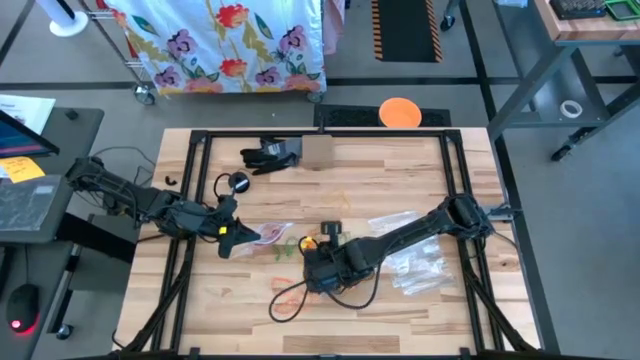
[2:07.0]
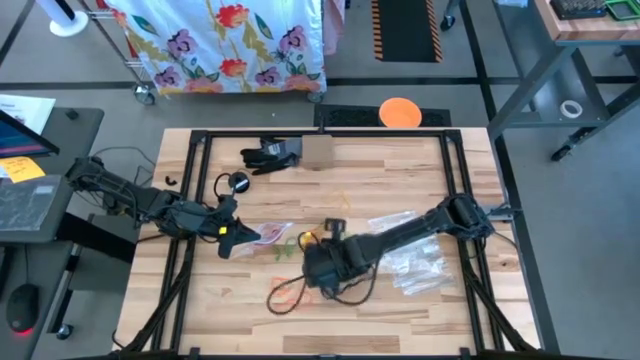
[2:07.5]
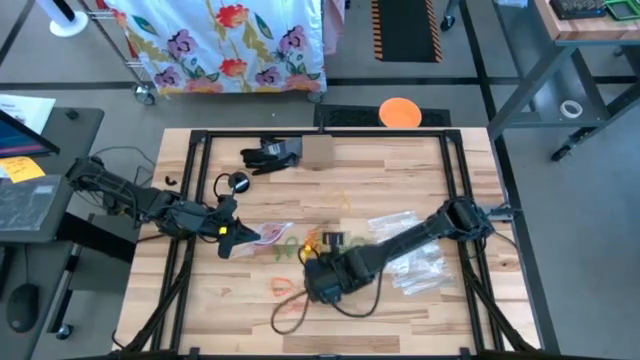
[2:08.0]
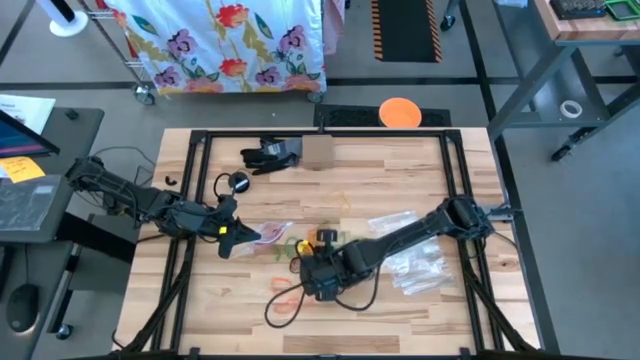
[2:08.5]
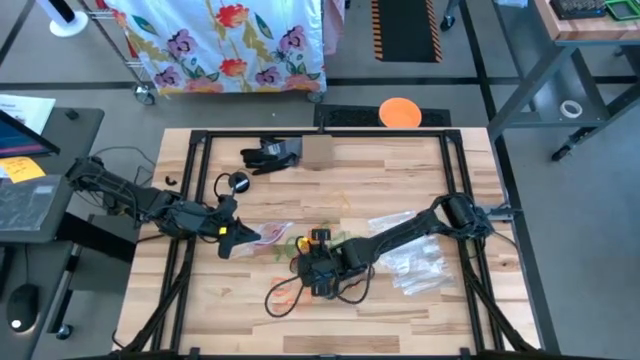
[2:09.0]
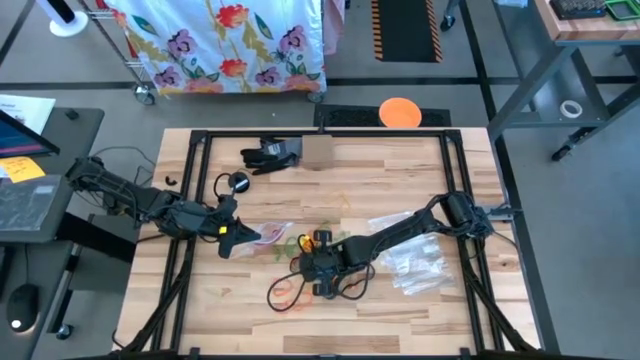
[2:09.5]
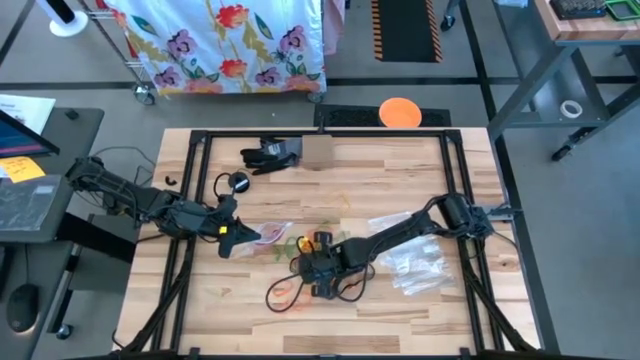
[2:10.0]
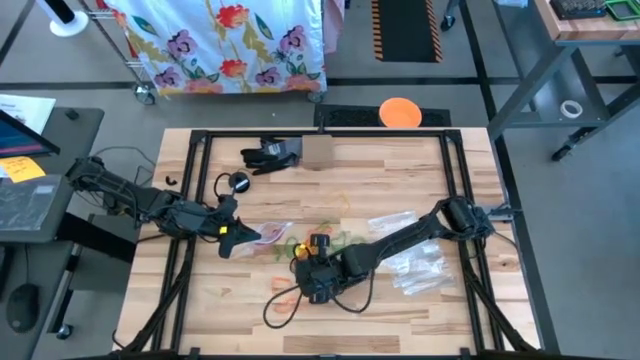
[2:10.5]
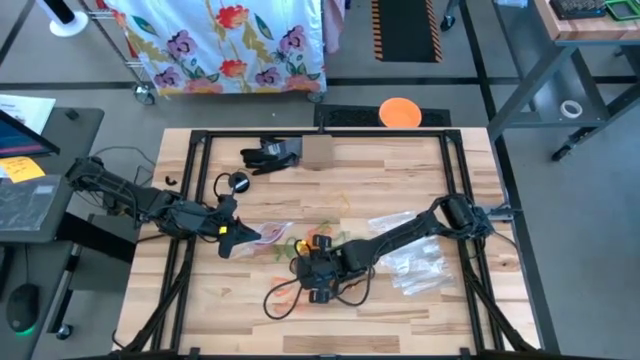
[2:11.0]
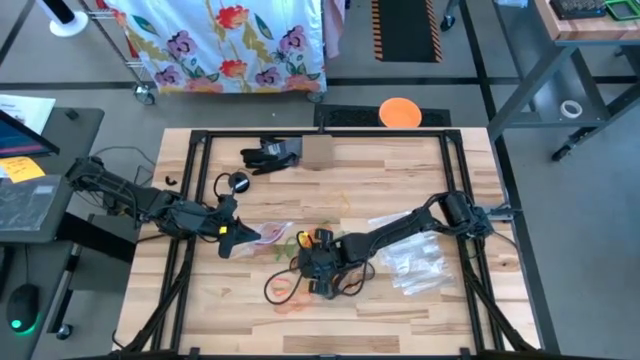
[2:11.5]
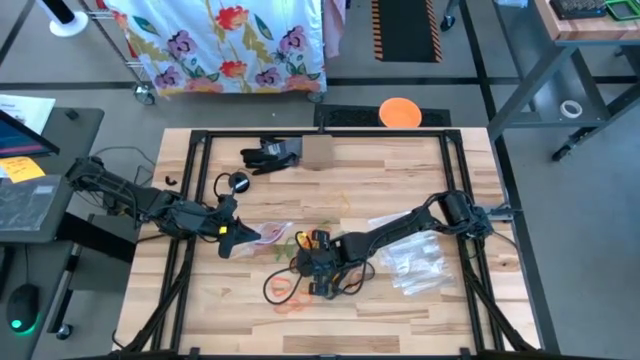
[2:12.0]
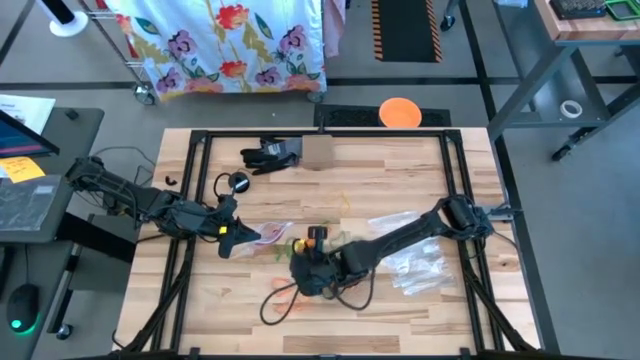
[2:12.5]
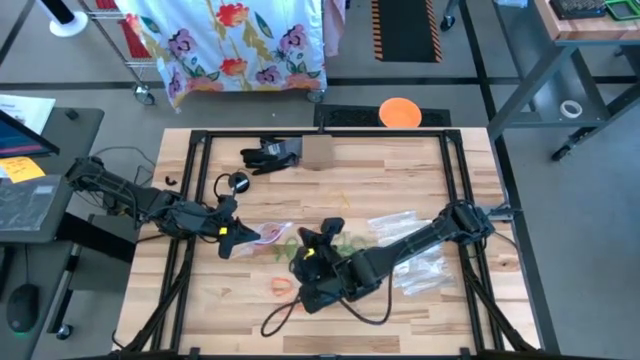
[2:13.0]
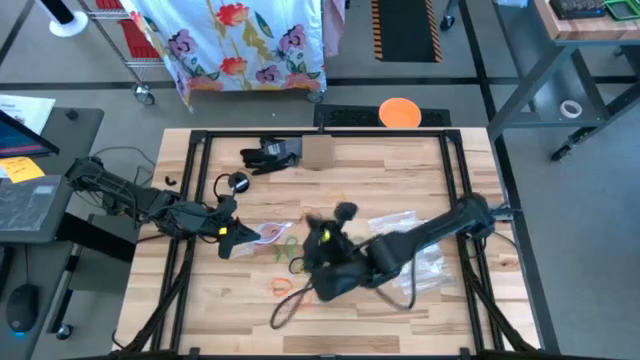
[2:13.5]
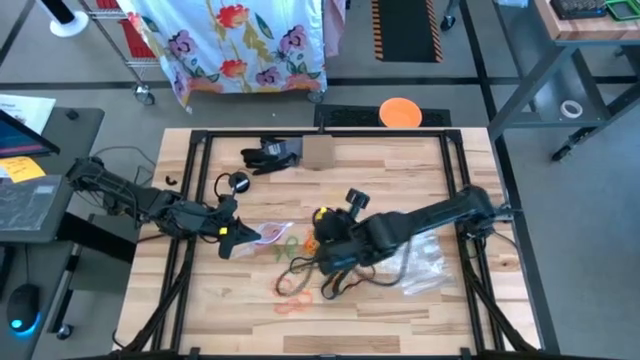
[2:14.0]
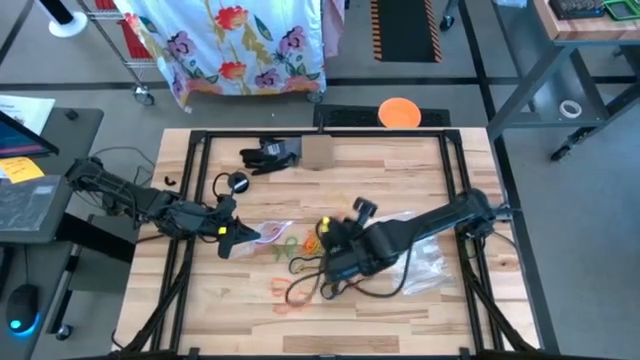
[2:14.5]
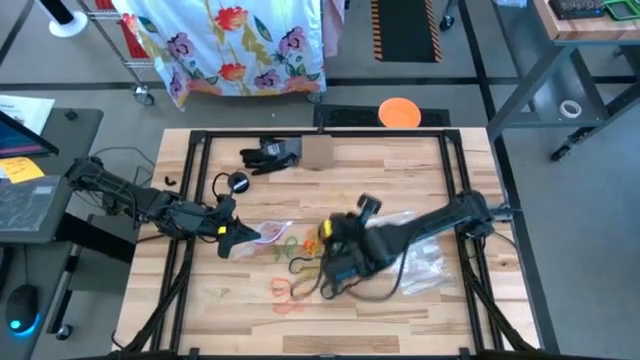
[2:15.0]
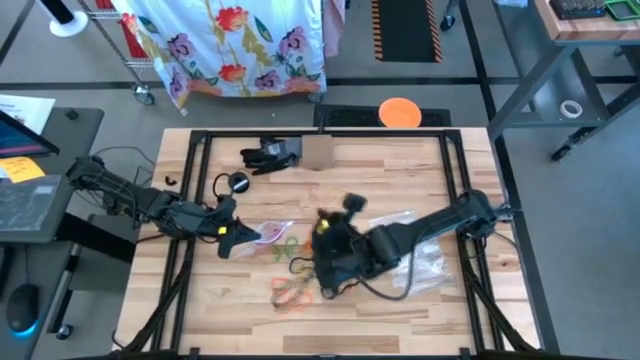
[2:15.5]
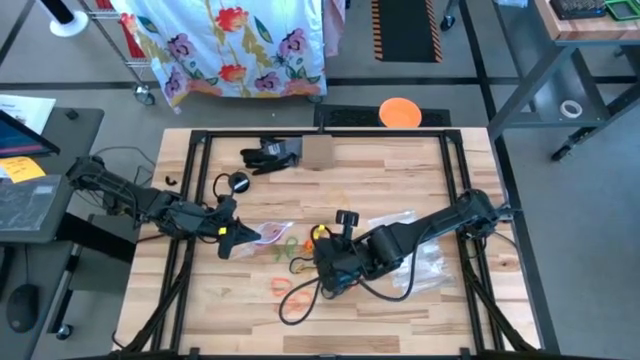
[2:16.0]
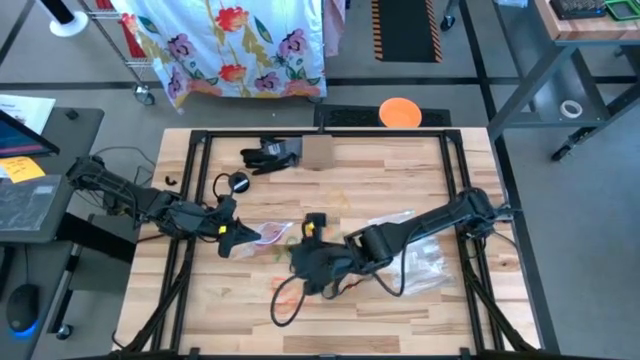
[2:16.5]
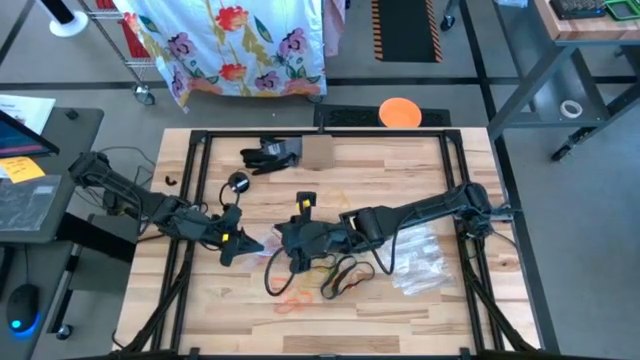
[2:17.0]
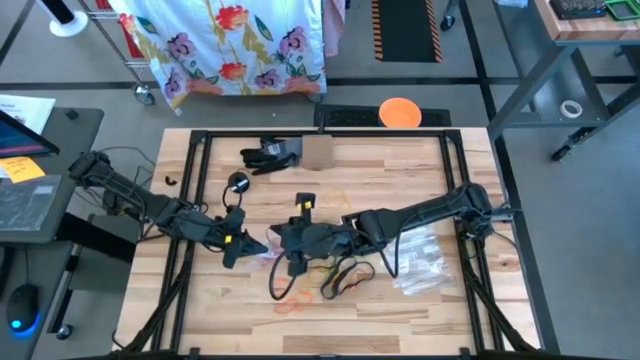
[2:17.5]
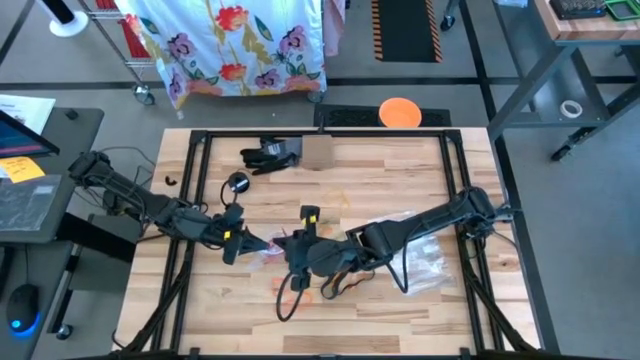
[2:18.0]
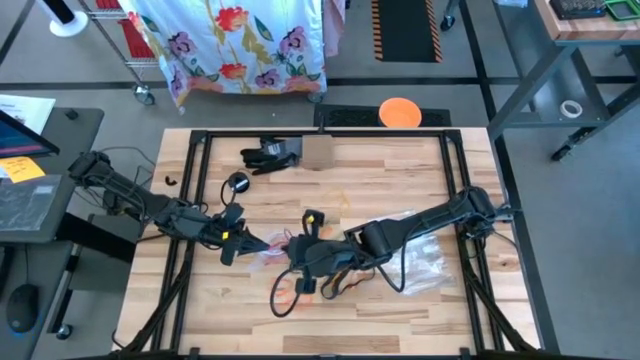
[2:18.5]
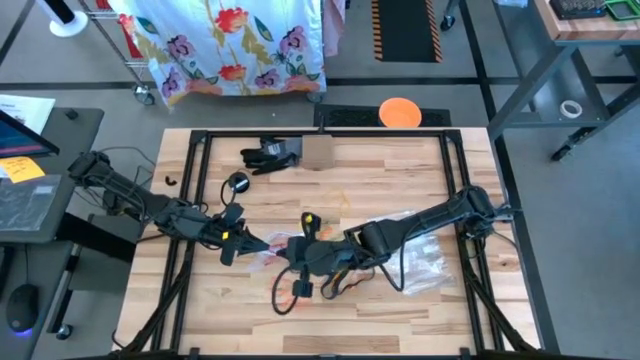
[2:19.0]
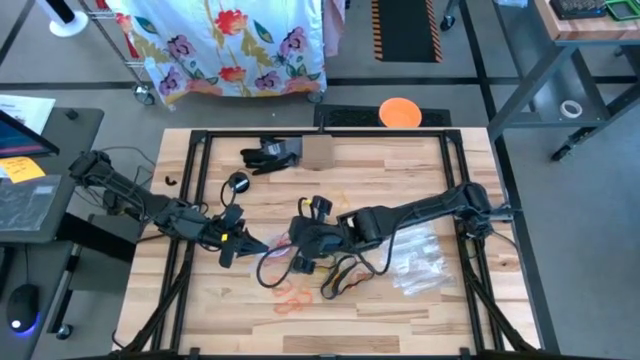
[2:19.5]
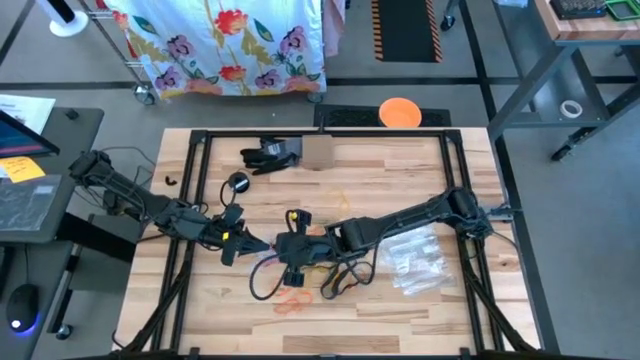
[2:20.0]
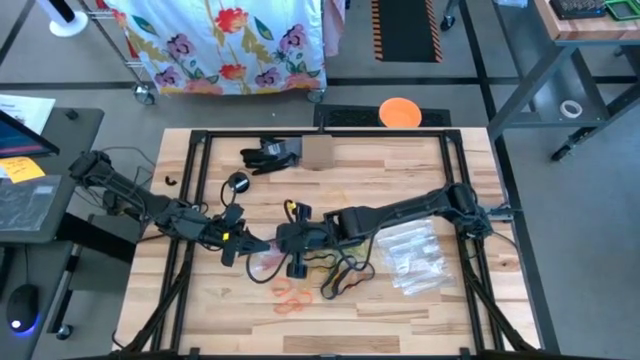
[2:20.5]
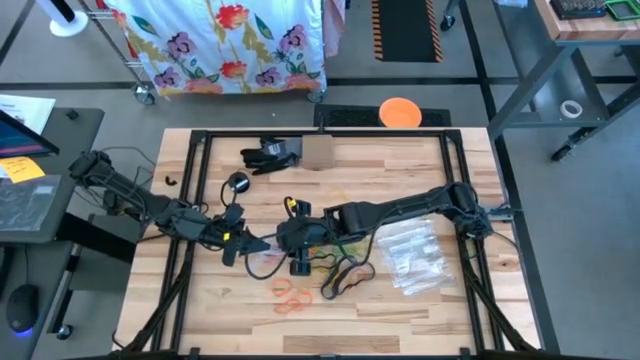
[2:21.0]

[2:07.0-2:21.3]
Task: Sort rubber bands
Put the red rubber band into the transparent zip bag

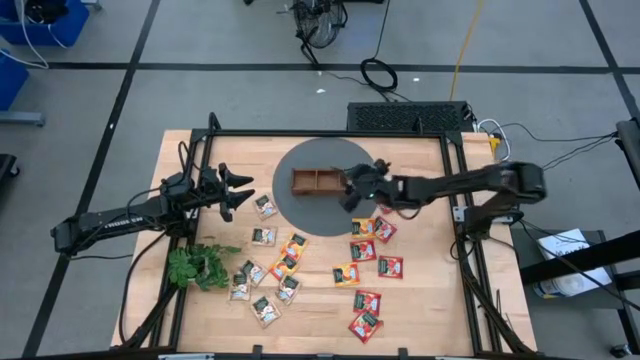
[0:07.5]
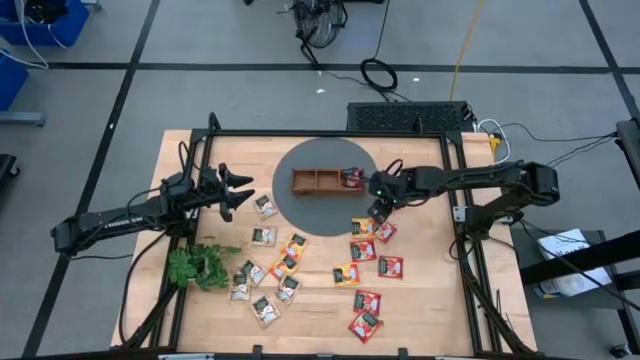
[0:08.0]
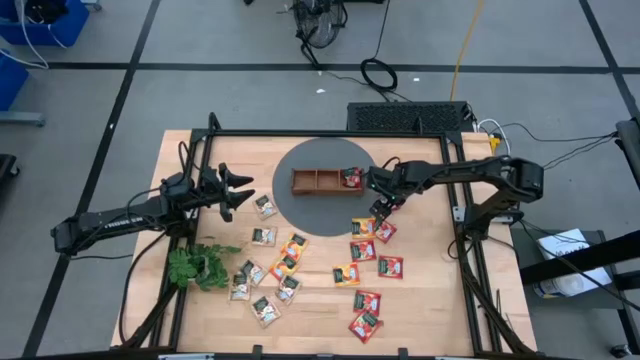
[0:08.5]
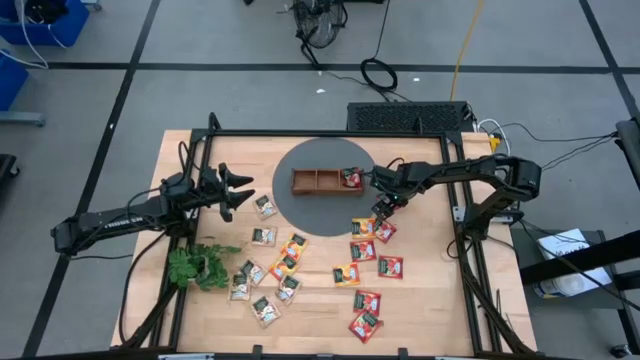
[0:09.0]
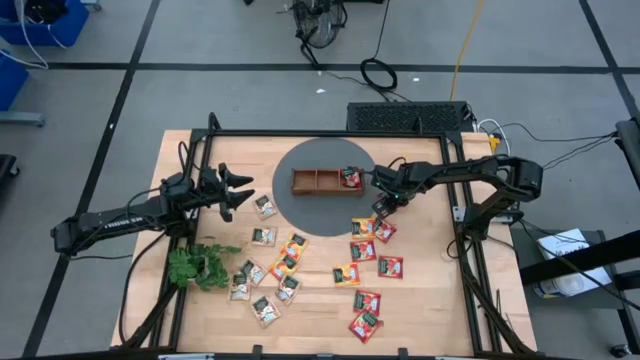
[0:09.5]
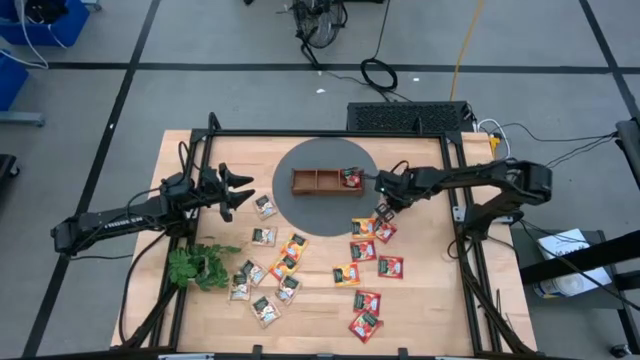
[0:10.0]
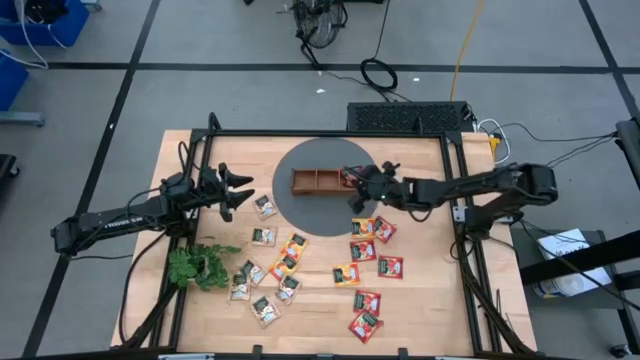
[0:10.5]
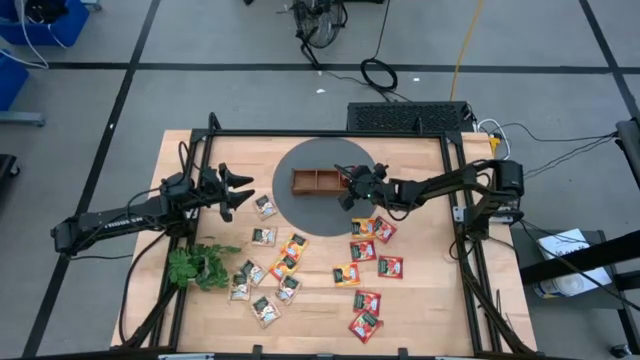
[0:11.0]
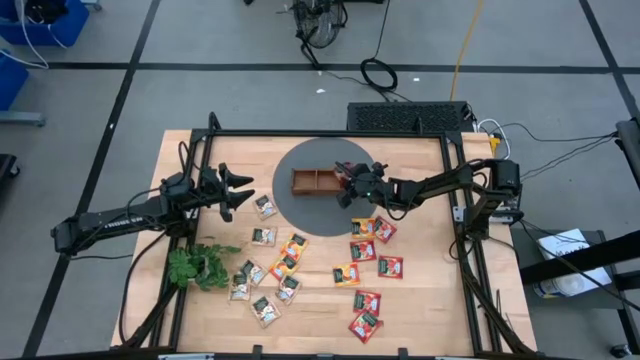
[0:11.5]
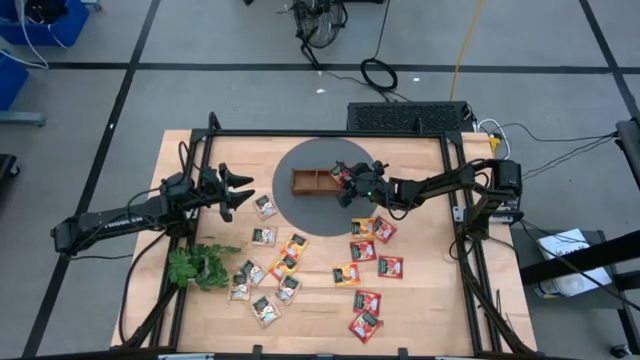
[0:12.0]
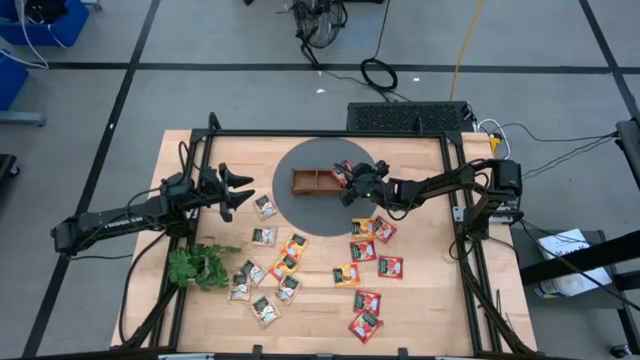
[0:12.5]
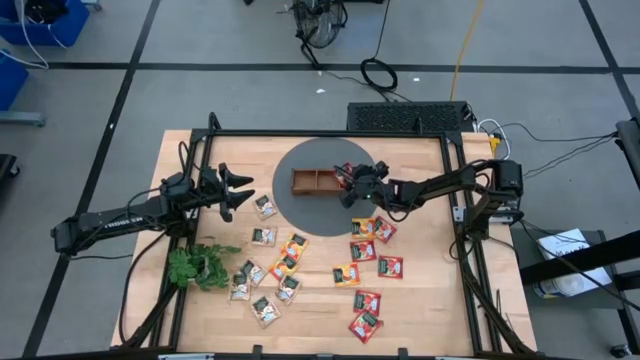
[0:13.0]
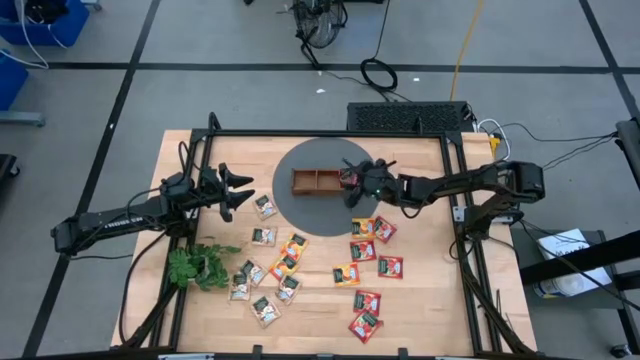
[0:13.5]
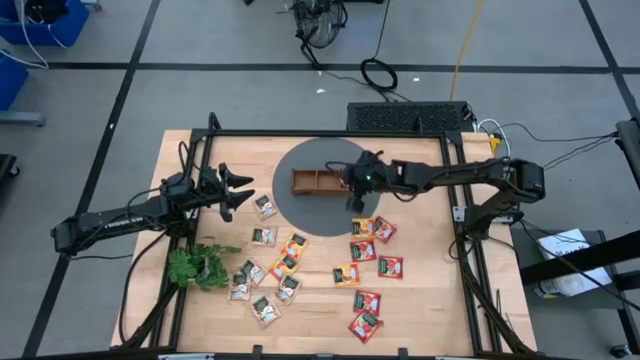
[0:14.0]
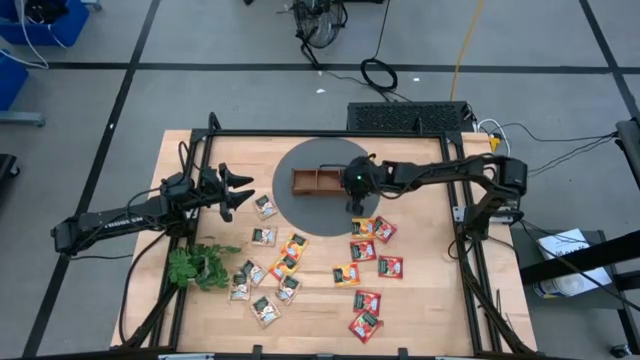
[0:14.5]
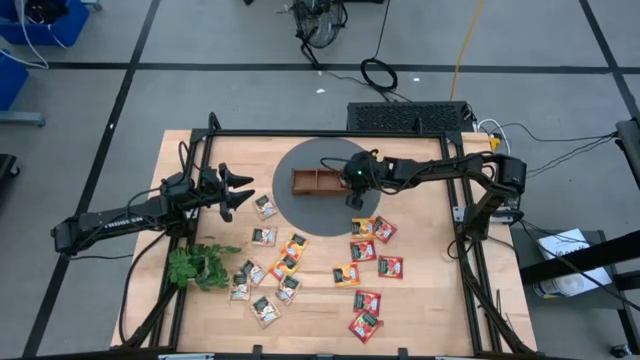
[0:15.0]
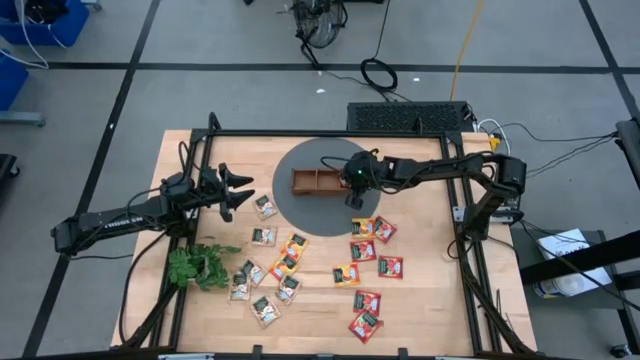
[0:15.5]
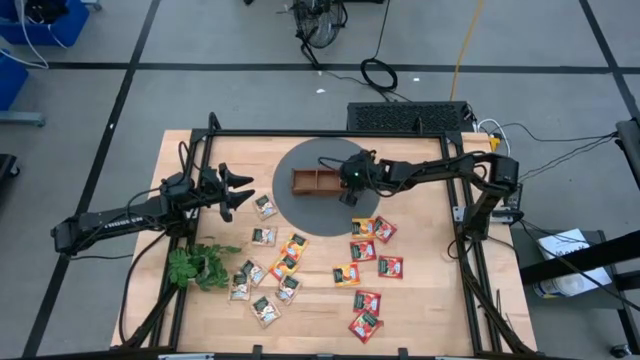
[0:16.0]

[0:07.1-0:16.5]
Task: Pick & Place Tea
Put the red tea bag into the right section of the wooden organizer
